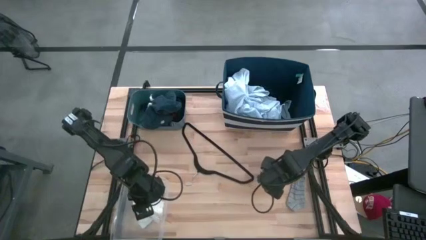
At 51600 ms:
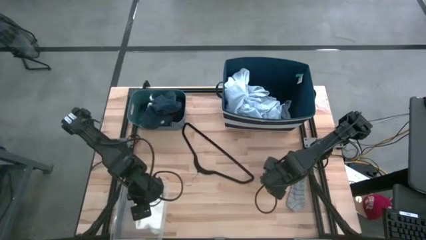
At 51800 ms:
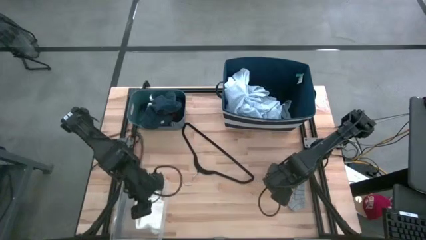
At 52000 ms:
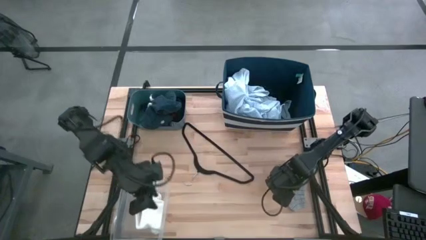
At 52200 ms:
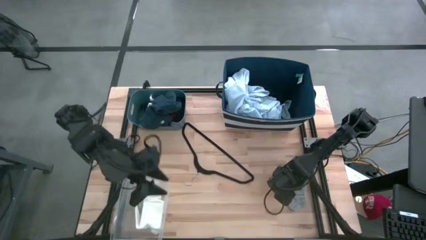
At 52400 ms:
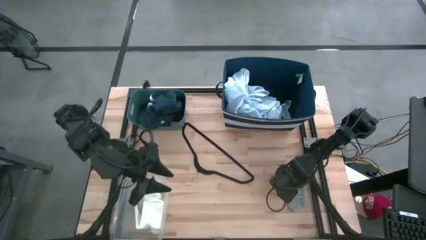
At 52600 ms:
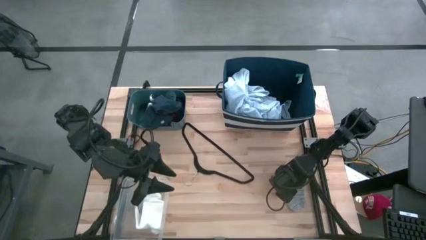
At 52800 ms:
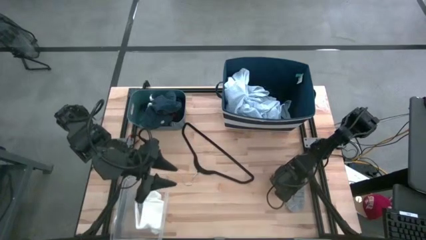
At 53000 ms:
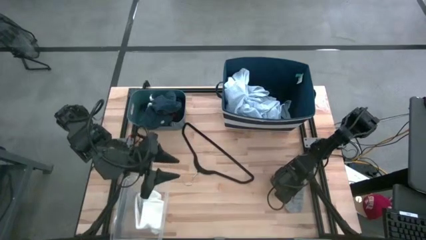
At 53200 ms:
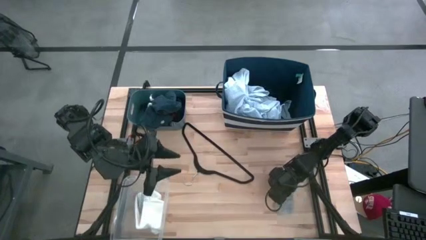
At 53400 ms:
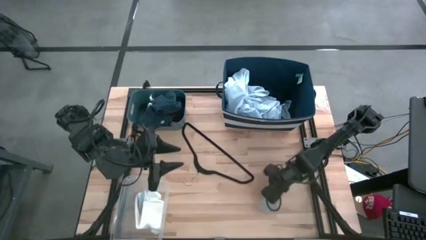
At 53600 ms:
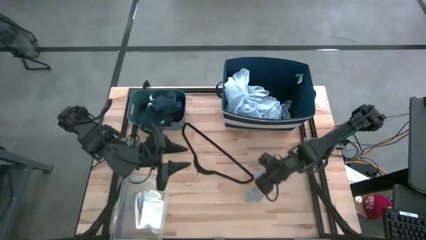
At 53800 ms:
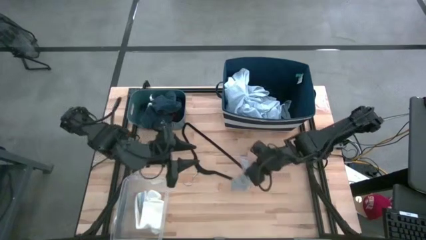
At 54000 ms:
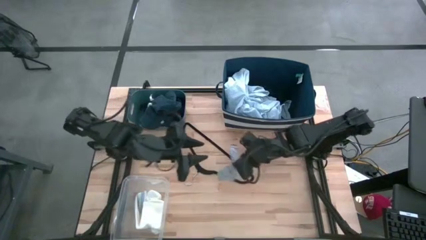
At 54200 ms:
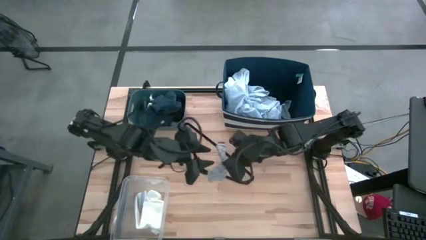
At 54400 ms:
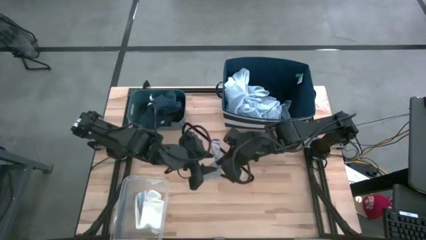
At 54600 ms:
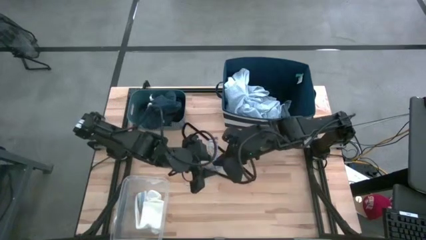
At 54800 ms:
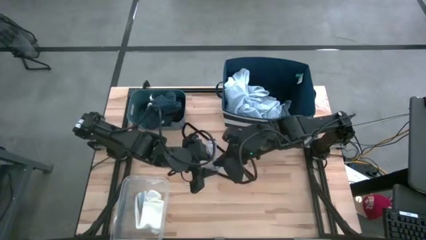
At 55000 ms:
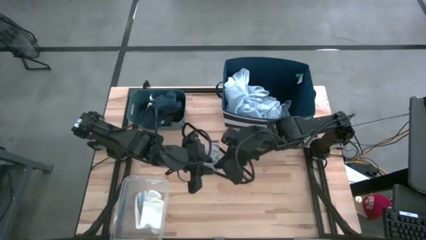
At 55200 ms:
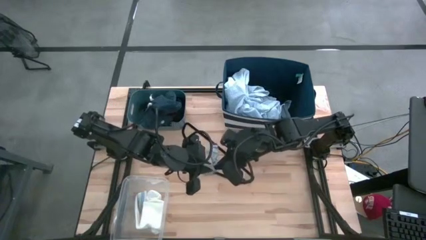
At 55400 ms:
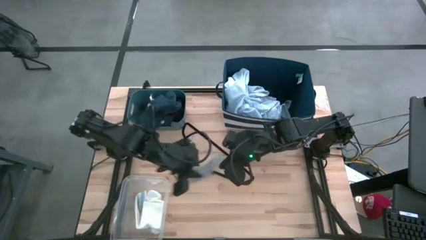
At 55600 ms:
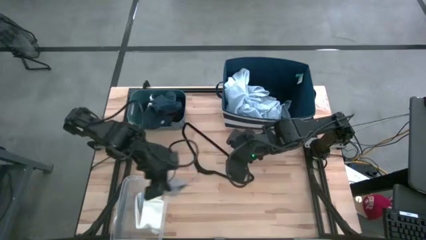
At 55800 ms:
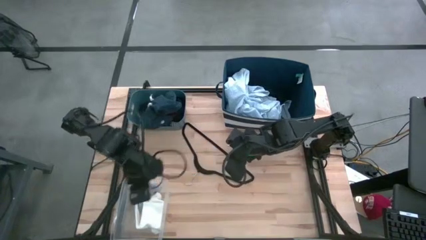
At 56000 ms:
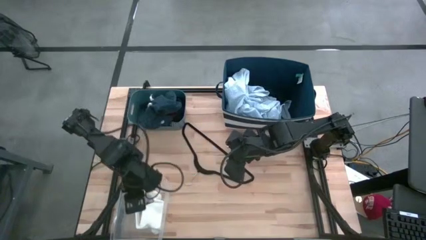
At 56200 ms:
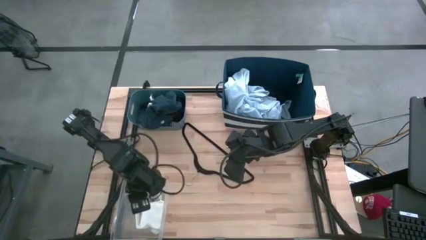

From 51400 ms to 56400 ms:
Task: Pick & Place Cloths
Put the gray sock into the transparent bin

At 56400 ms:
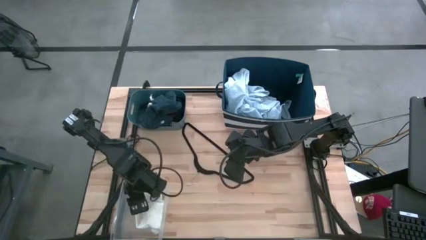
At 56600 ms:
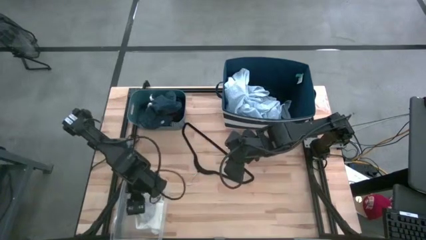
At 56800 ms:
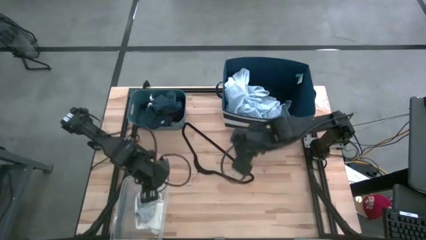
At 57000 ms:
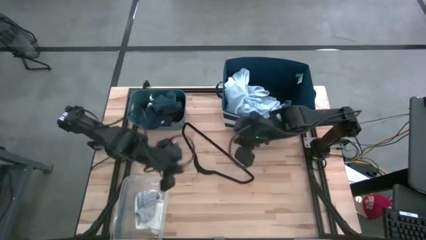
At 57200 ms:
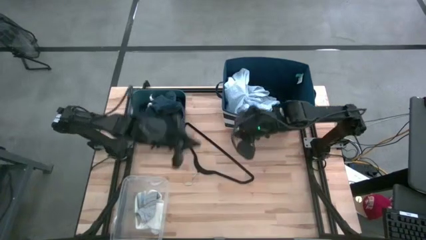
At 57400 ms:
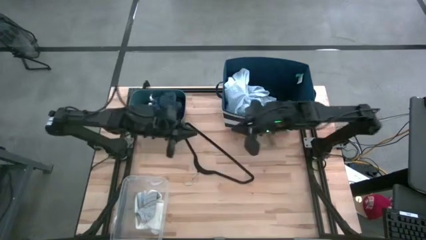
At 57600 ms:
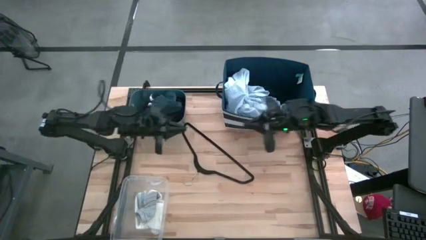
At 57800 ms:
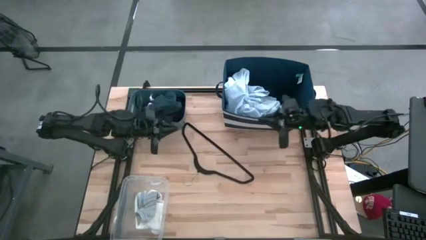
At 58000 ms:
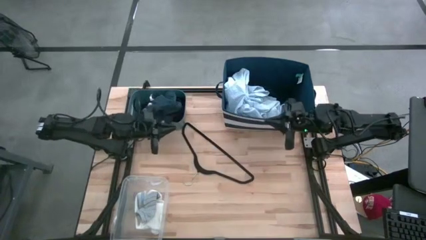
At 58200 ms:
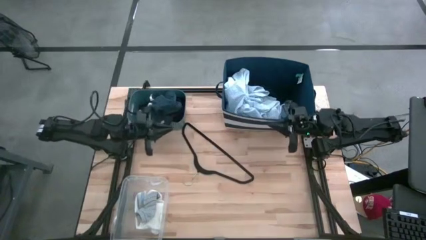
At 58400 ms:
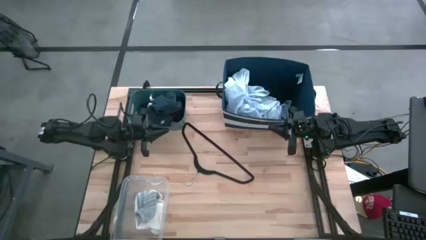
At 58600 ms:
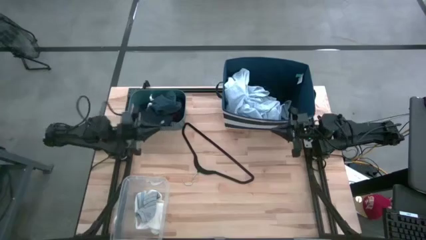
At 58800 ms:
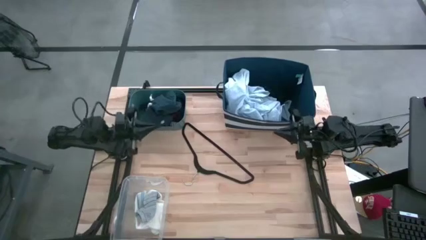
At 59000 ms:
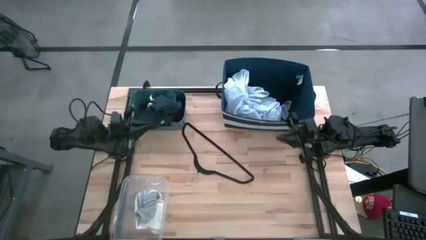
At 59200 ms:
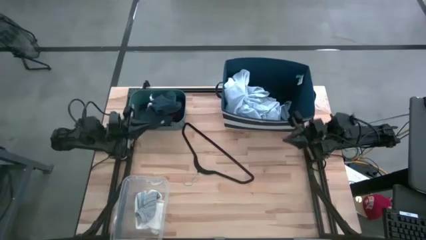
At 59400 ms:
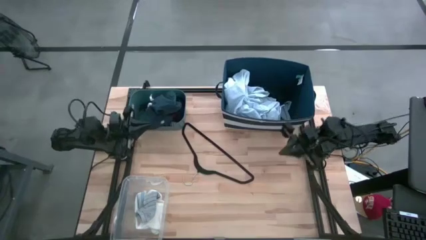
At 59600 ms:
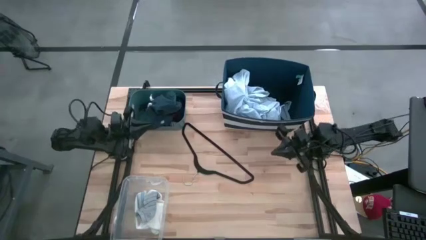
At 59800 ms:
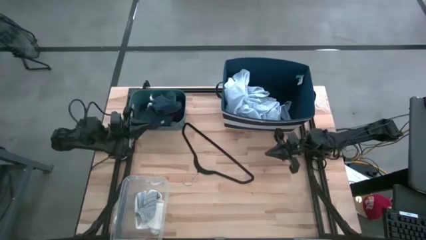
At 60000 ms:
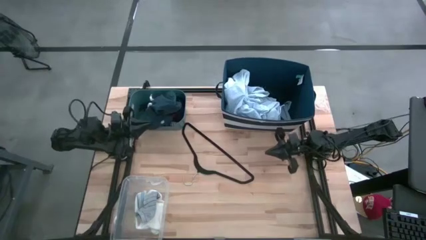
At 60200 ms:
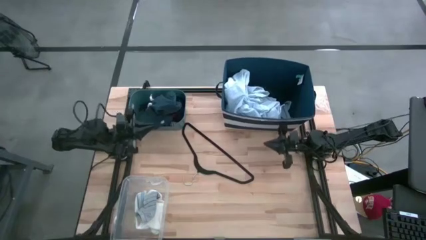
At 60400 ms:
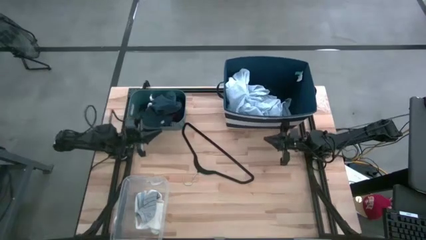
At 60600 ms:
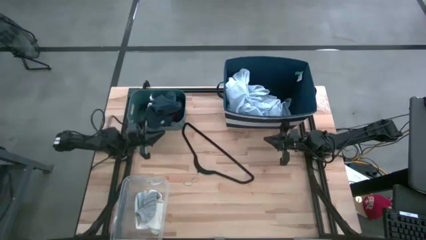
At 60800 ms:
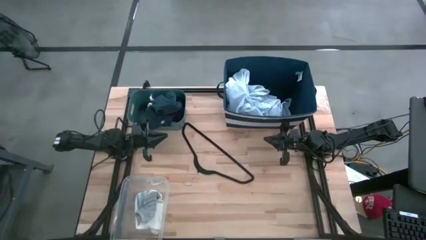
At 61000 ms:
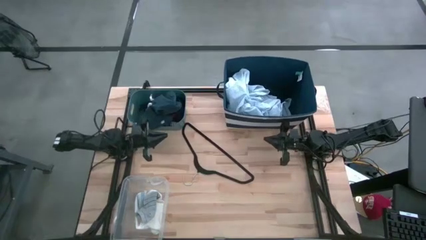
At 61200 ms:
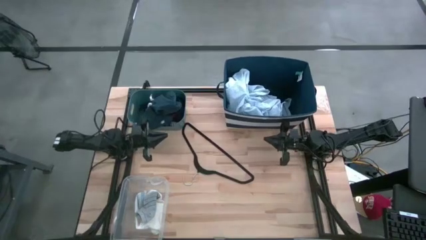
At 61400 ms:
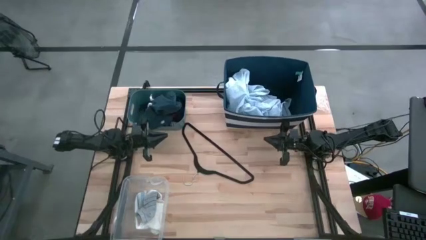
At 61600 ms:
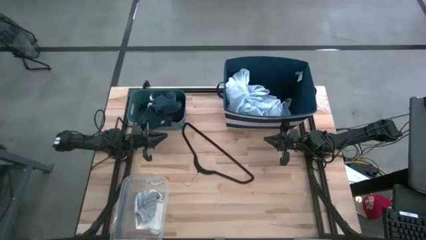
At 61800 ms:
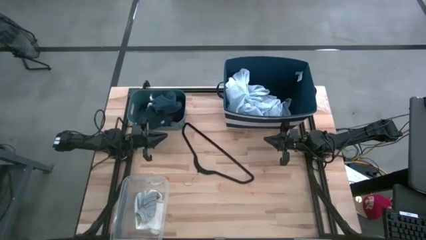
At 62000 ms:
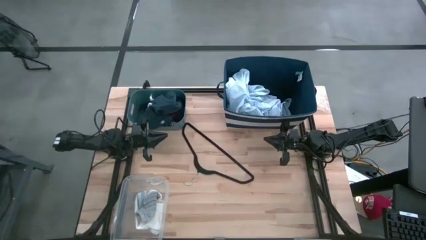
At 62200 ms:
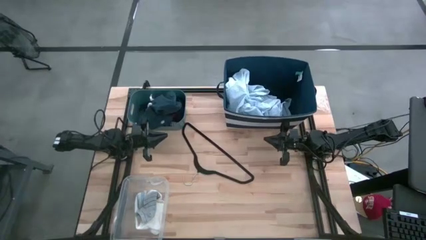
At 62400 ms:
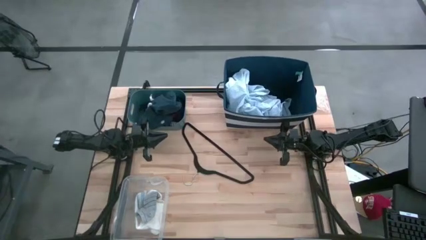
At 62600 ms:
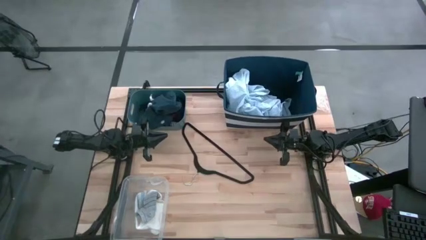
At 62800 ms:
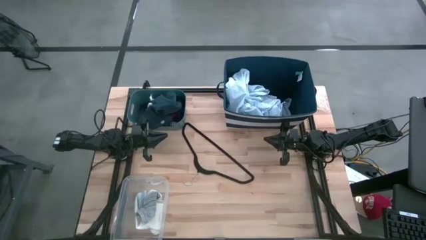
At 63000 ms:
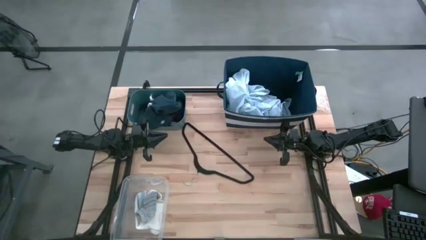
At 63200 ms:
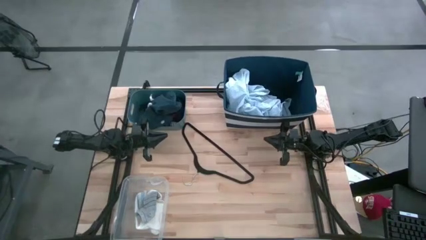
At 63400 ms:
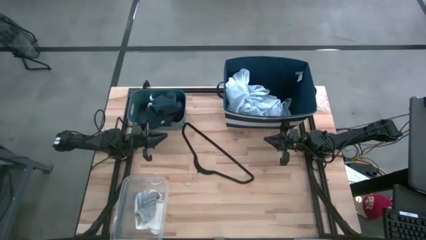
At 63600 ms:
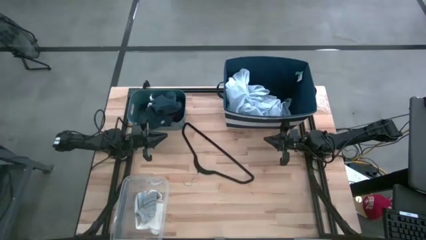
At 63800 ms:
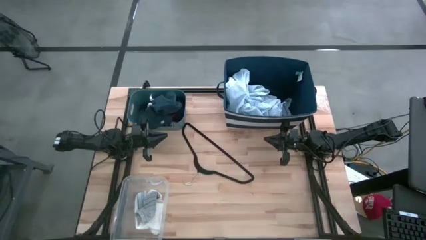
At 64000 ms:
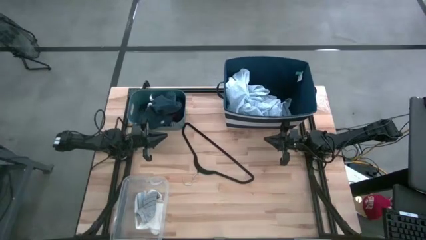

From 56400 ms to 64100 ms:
Return to Home Position

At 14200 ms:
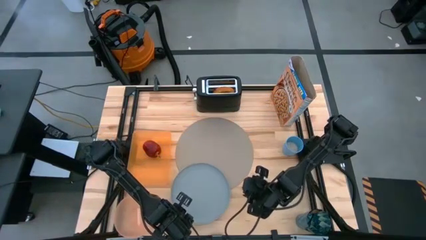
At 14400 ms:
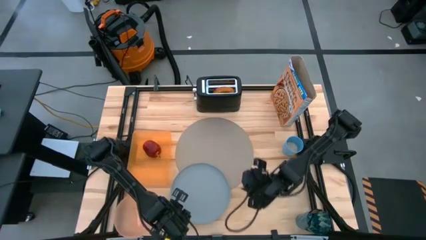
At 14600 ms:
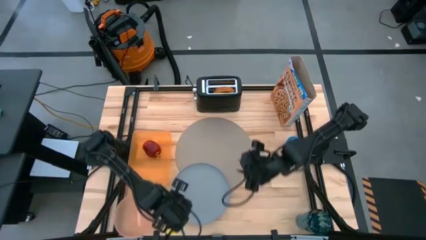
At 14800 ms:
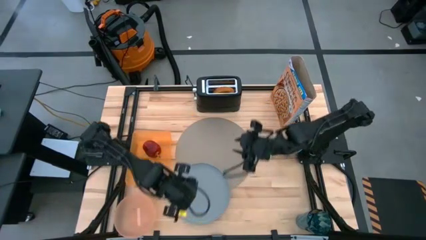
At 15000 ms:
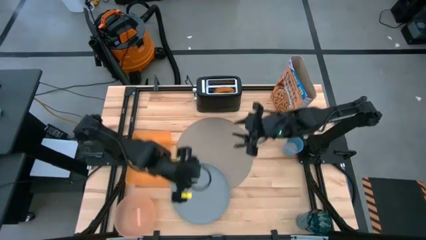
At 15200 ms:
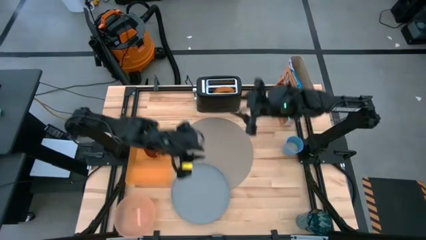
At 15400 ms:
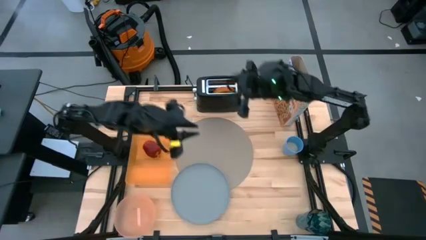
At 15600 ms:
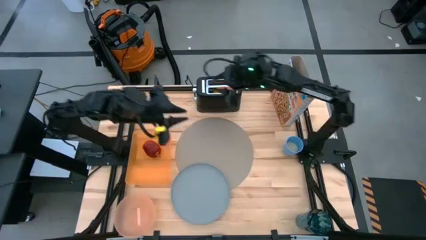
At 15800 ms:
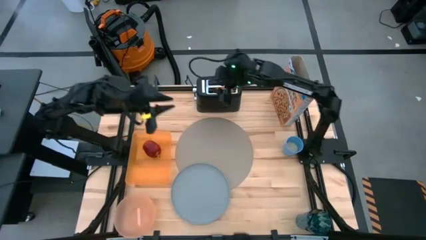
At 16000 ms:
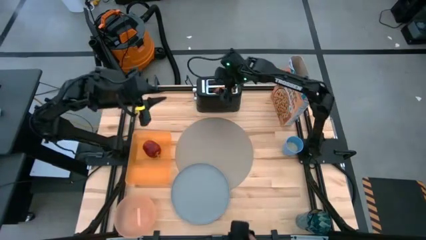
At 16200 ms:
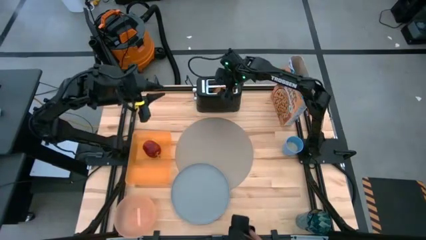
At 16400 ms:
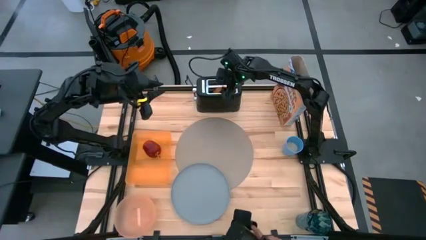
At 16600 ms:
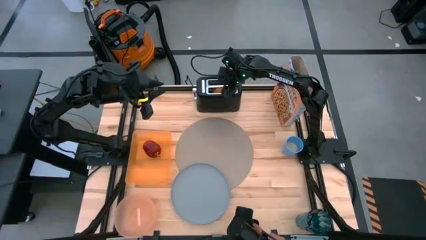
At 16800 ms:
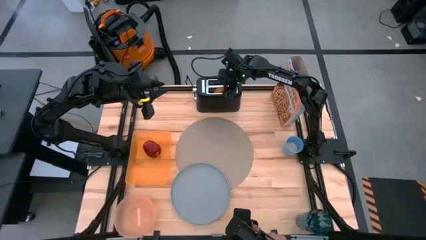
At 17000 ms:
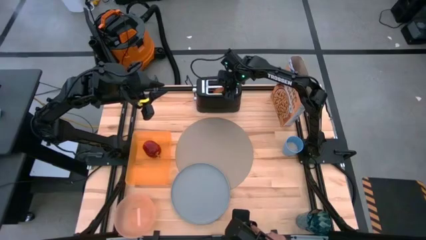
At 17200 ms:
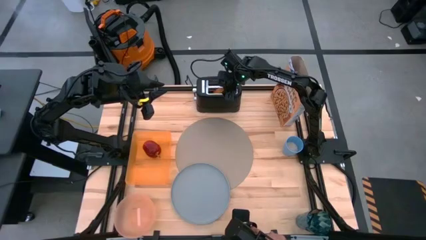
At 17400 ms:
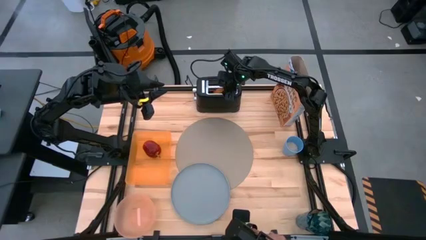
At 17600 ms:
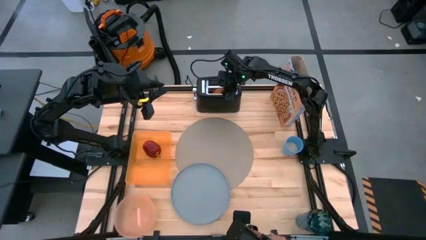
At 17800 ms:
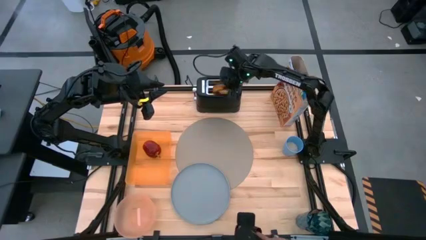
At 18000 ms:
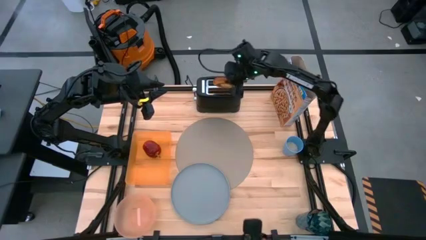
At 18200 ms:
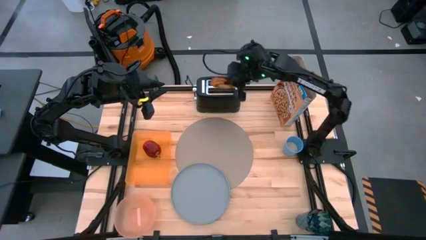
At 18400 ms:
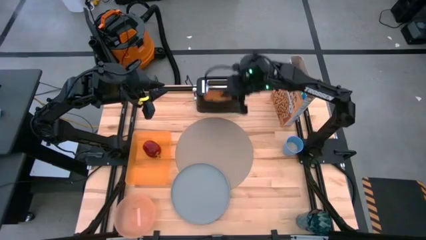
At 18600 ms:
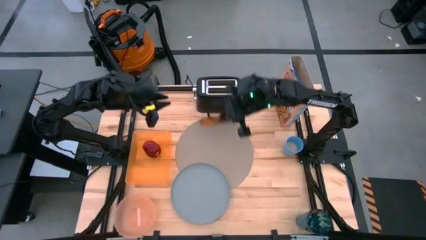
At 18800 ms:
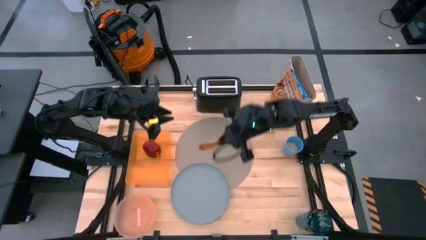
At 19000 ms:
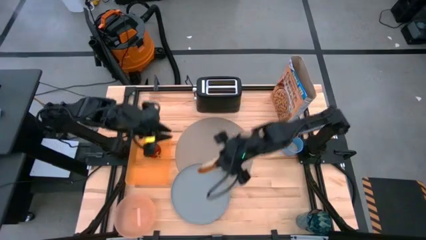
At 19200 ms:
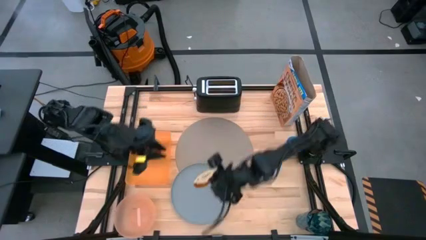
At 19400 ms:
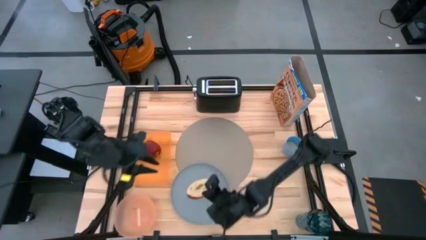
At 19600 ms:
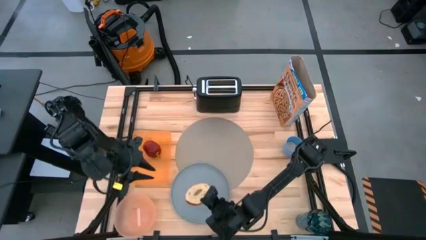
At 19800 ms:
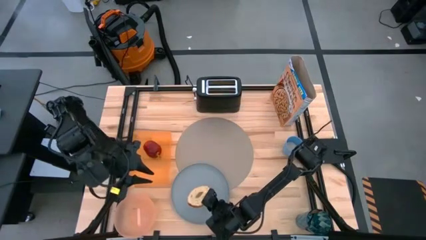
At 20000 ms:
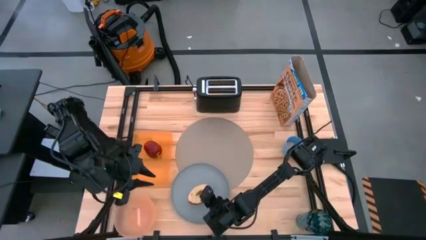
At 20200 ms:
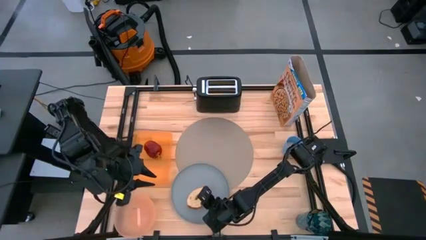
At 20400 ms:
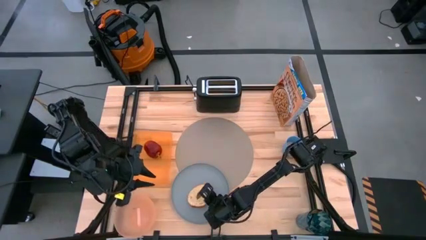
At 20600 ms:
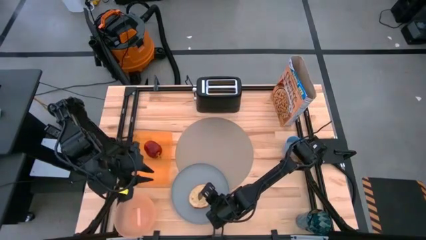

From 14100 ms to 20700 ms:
Task: Arrange a breakfast setting
Remove the toasted bagel from the toaster and put it into the light blue plate
